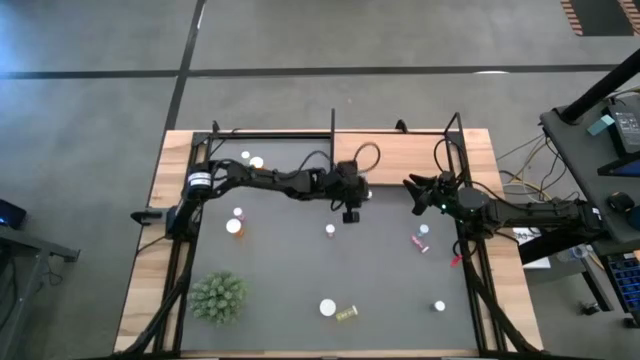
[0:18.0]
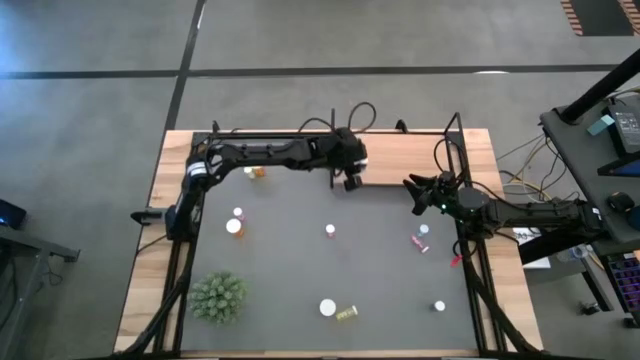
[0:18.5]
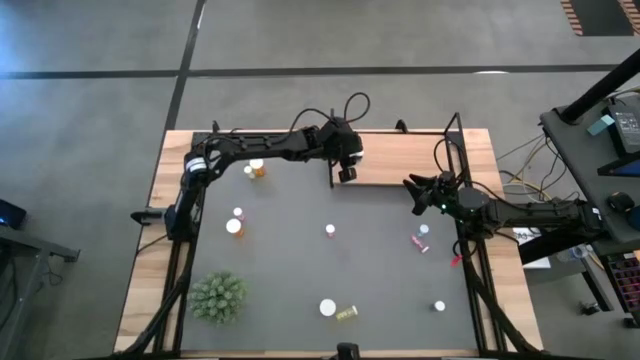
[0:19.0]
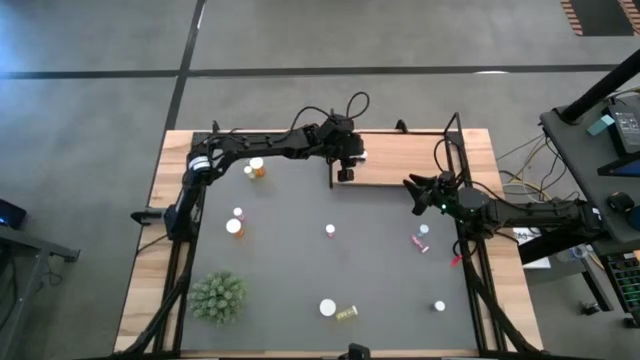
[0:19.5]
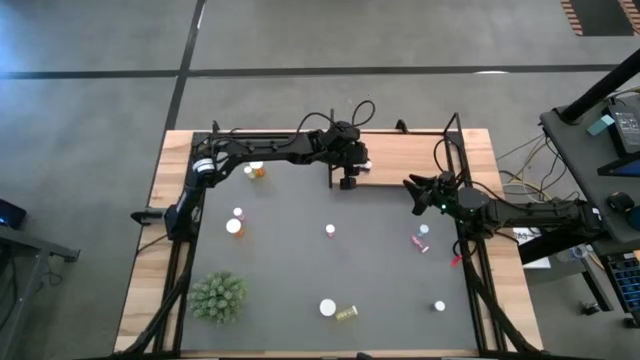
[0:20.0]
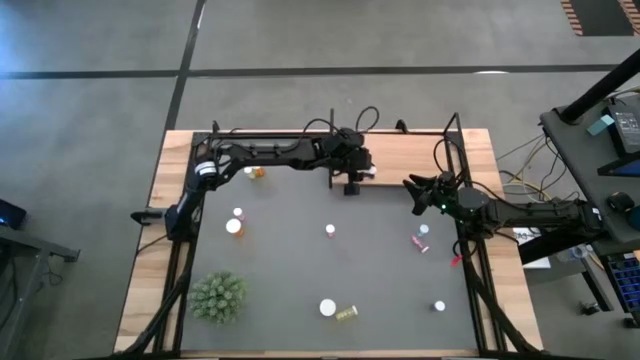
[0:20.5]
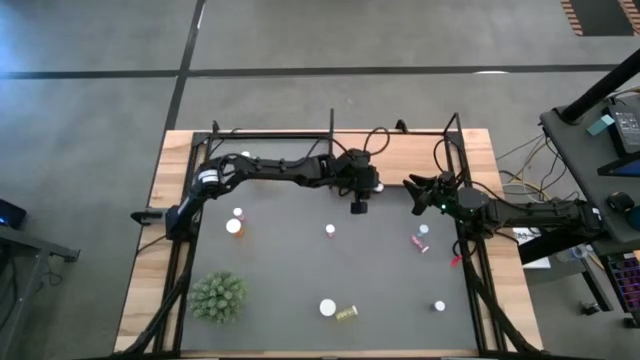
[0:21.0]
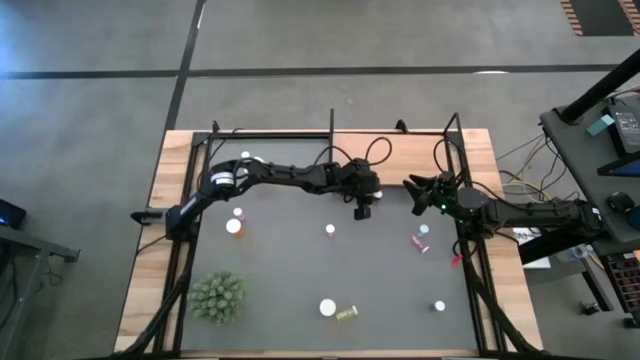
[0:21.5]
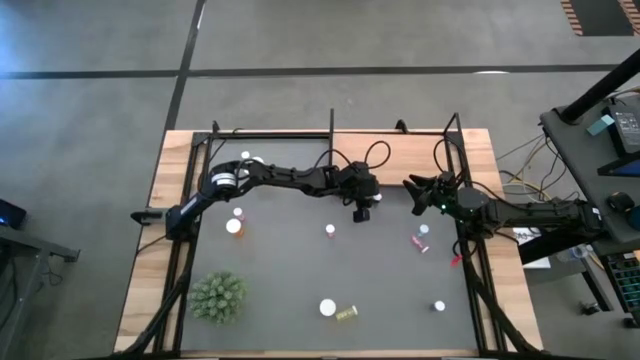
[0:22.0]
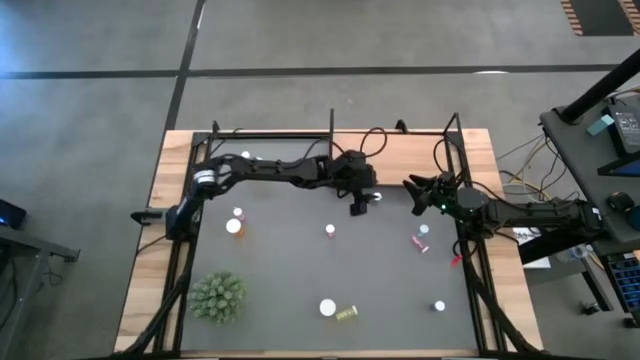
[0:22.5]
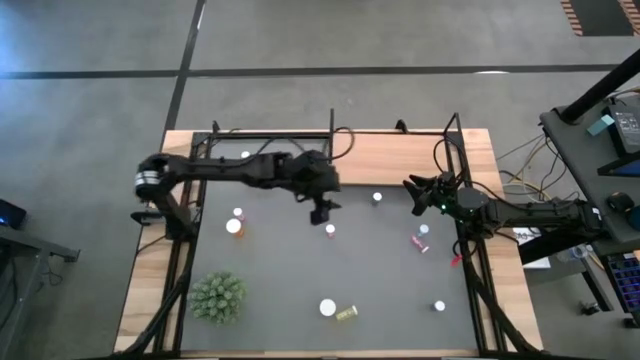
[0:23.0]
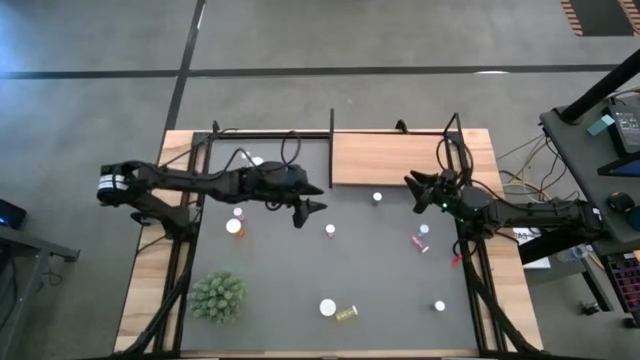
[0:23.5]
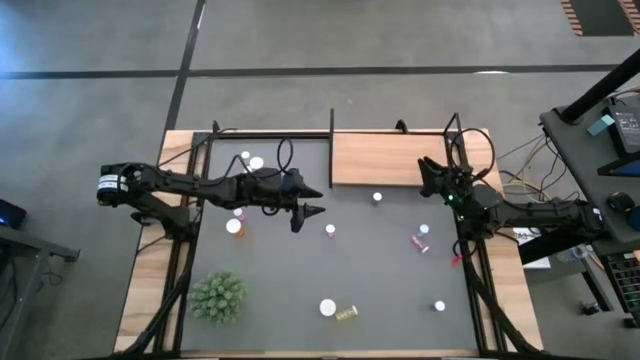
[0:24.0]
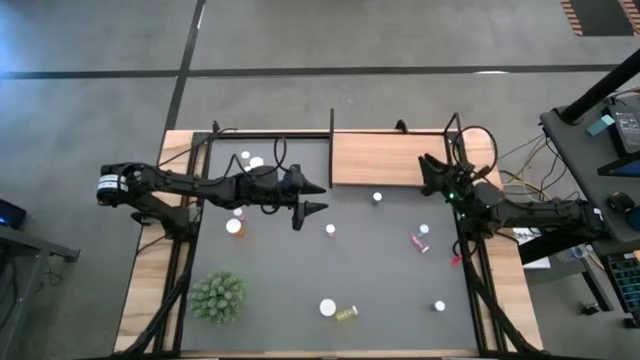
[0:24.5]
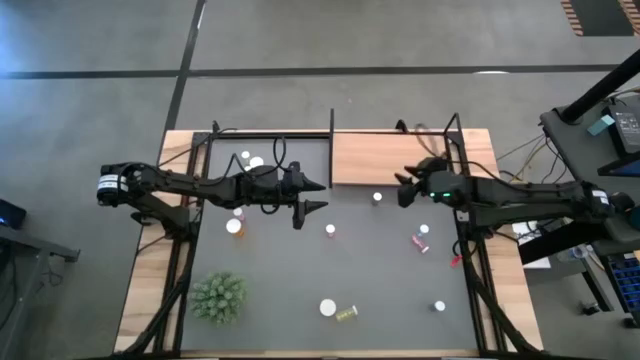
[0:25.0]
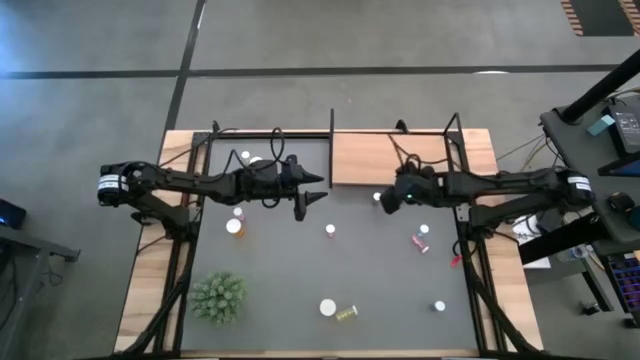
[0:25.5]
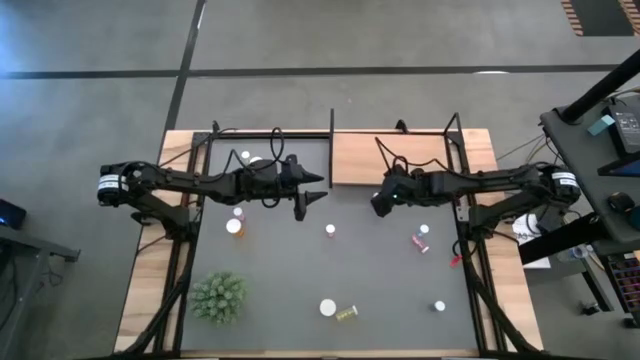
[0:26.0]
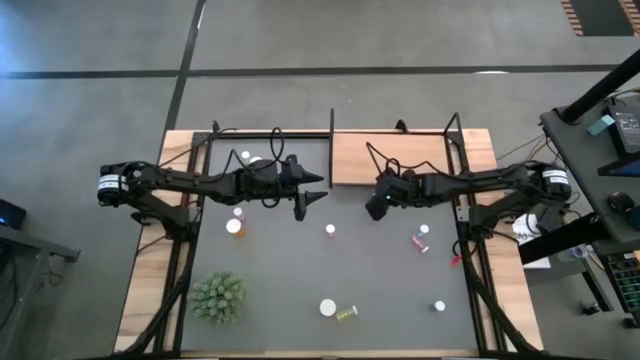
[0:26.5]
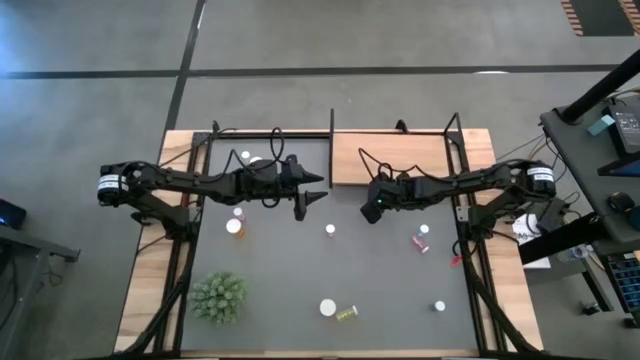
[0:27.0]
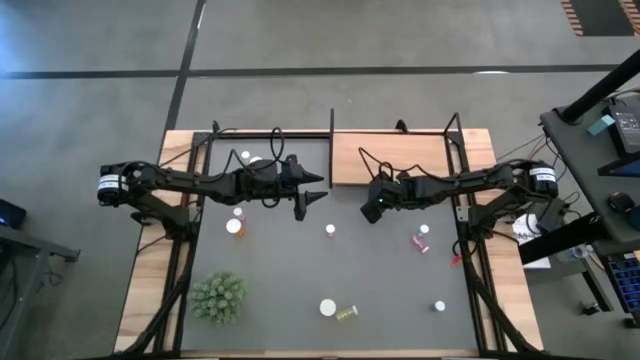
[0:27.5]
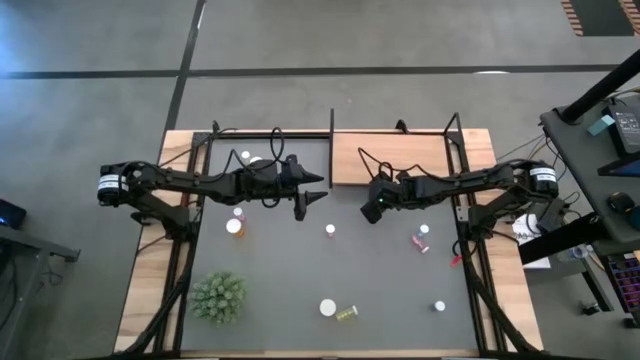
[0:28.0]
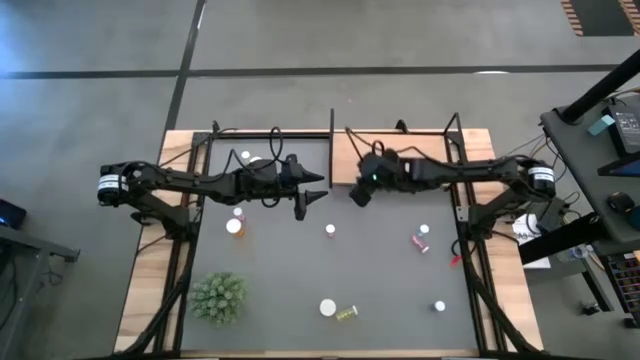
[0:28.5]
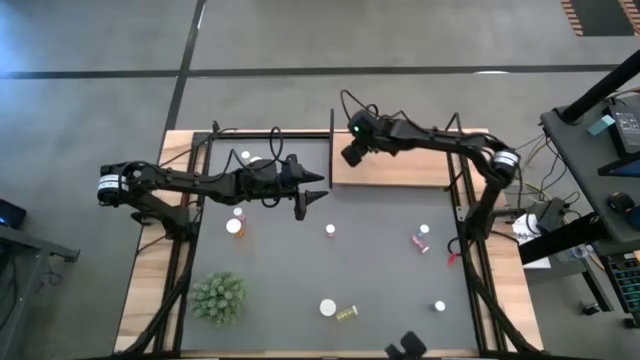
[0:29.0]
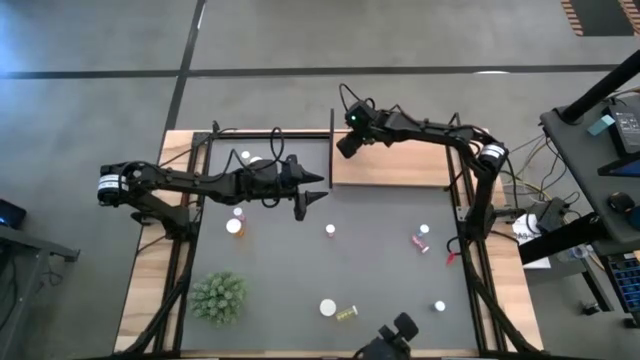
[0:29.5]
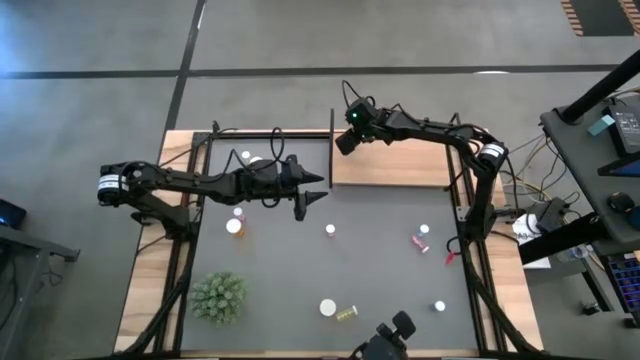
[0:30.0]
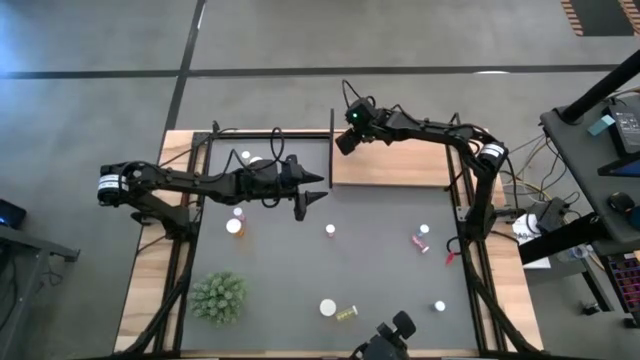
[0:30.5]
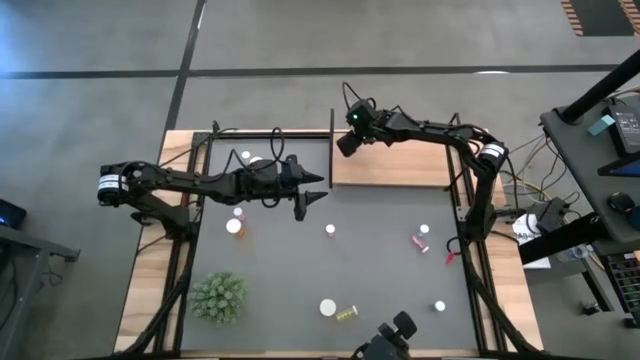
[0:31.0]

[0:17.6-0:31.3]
Task: Pick and place medicine bottles onto shelf by color
Put the top left blue pill bottle on the shelf

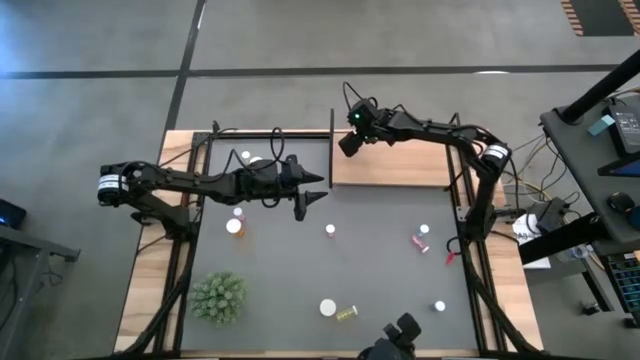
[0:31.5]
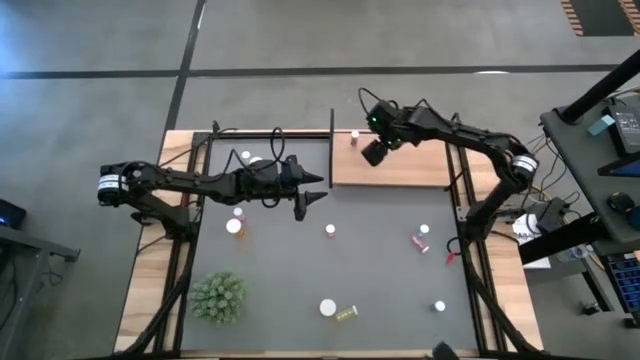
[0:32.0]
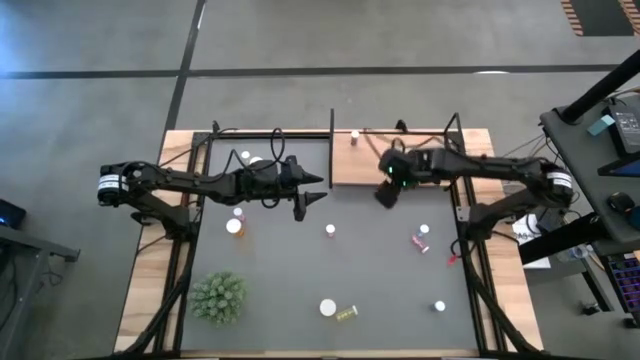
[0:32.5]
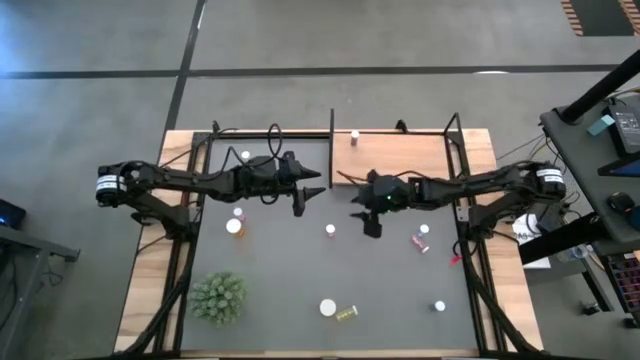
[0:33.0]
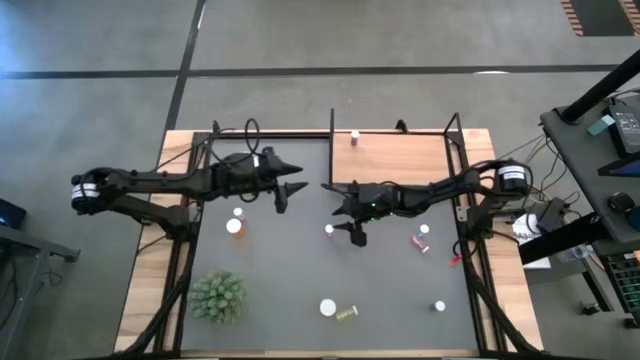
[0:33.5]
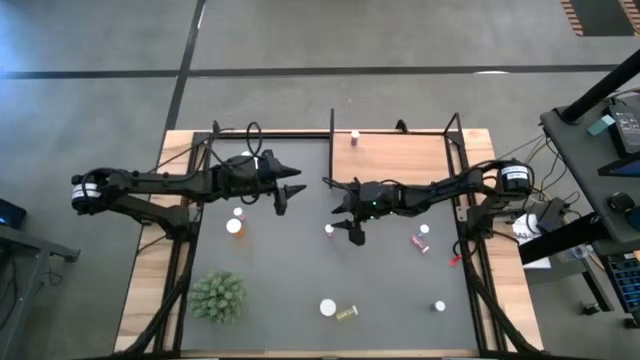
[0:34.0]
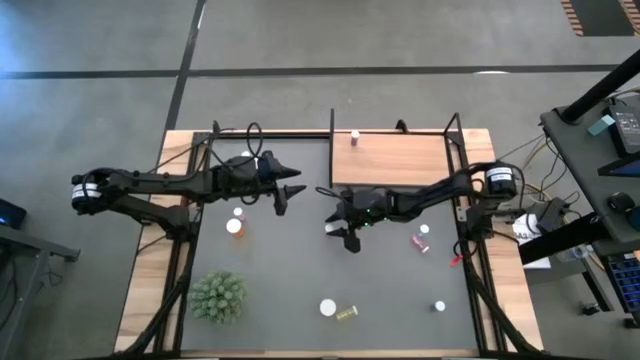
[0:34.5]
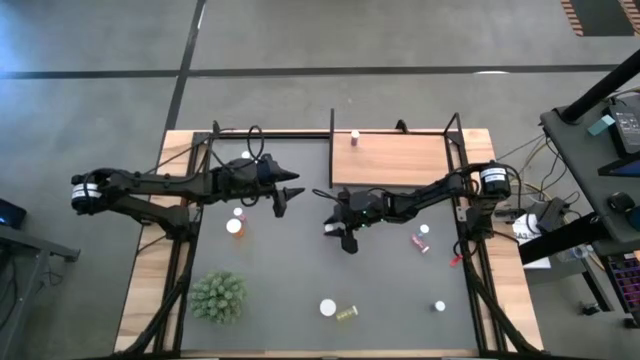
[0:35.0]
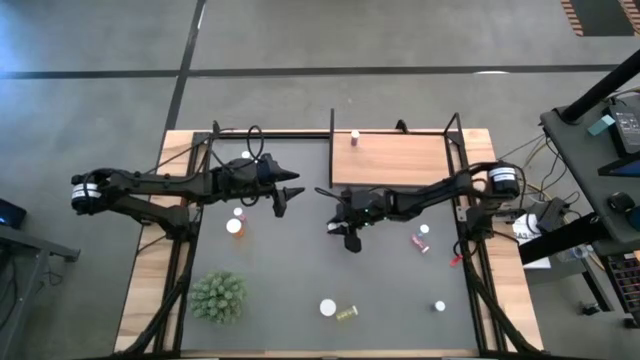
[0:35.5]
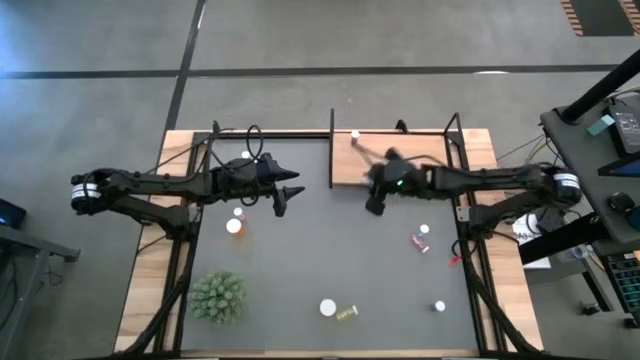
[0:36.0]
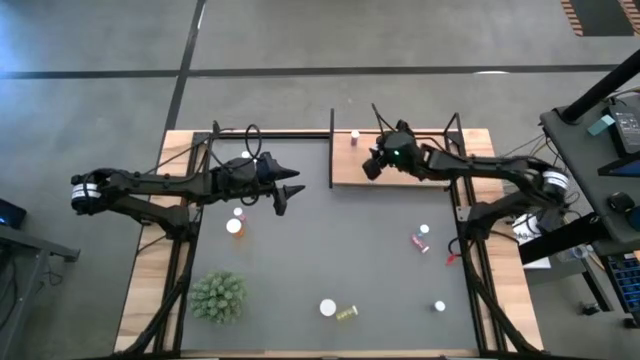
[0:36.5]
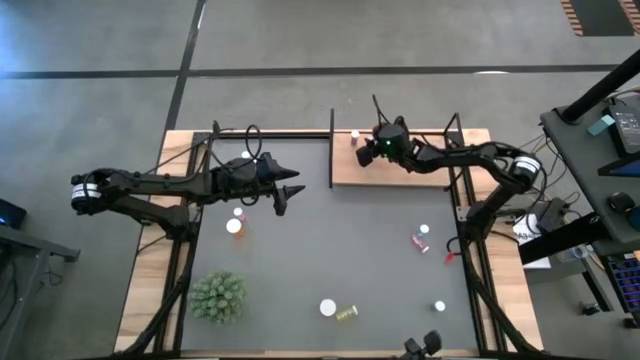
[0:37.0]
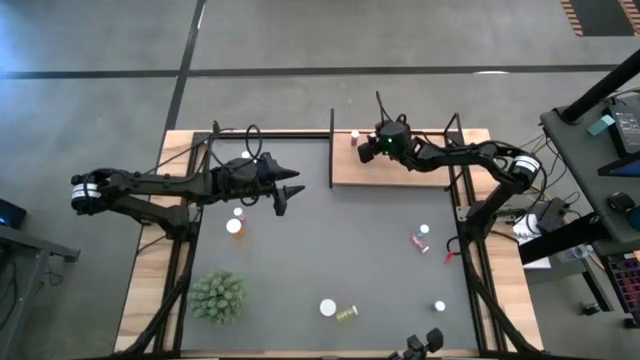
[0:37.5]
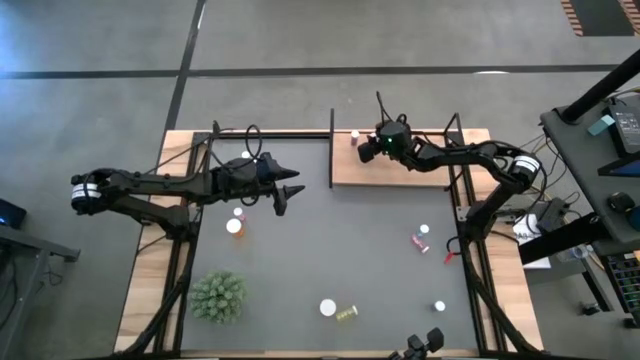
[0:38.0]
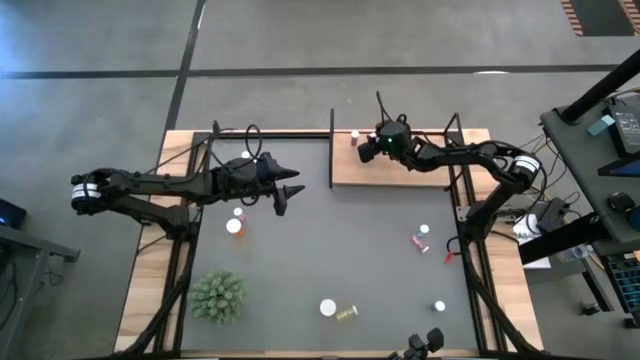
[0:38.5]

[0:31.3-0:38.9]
Put the middle pink pill bottle on the shelf

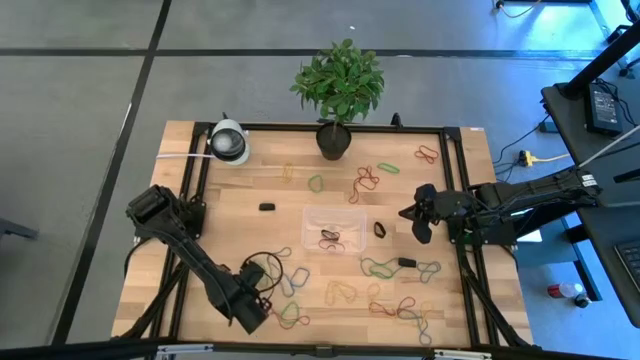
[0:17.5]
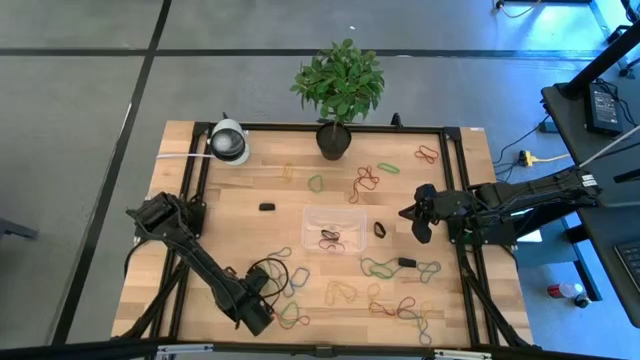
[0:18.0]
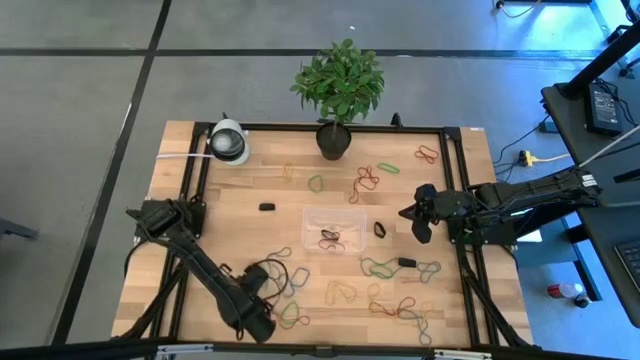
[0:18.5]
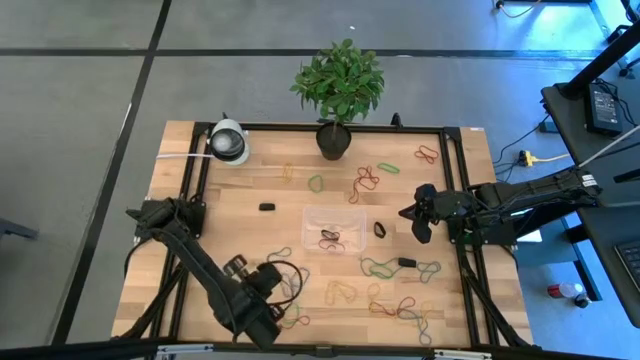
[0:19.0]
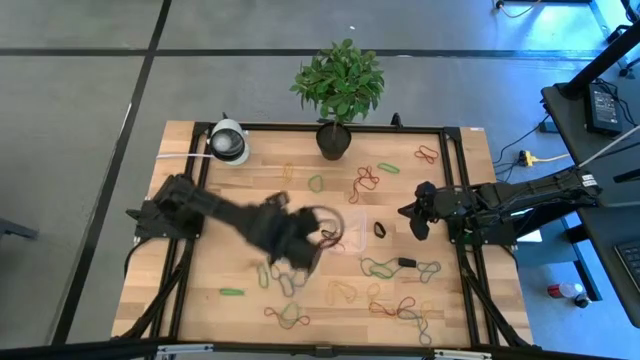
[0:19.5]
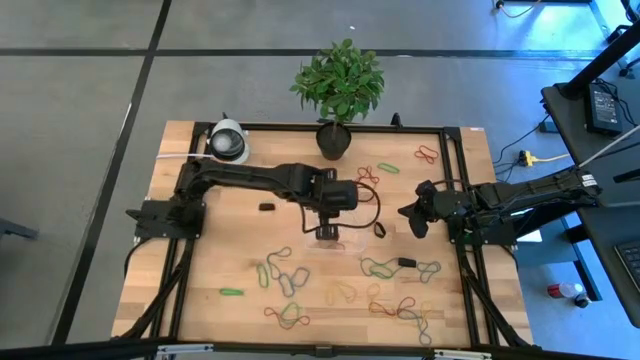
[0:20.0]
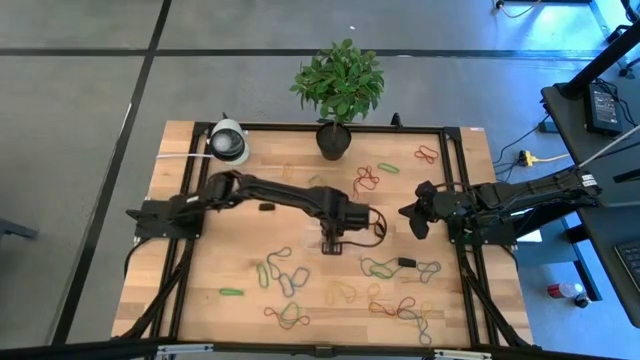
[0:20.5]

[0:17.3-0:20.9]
Task: Pick and place rubber bands into bin
Put the yellow rubber band into the bin
